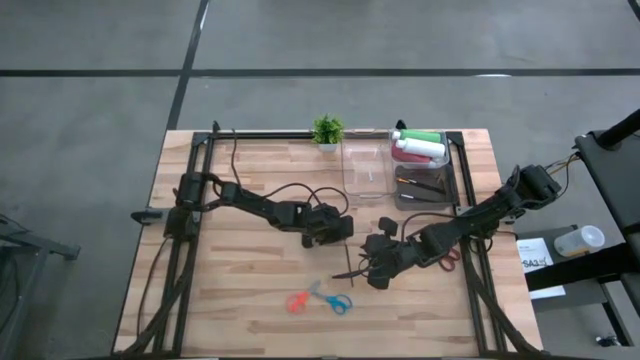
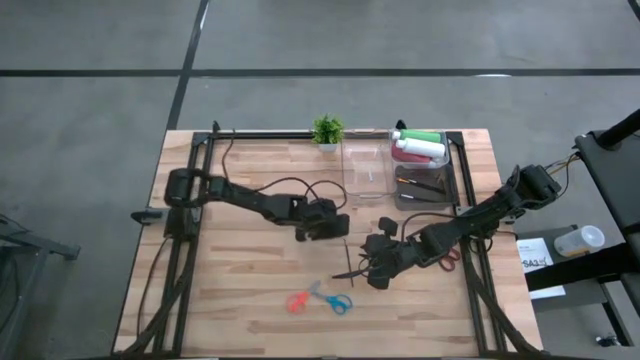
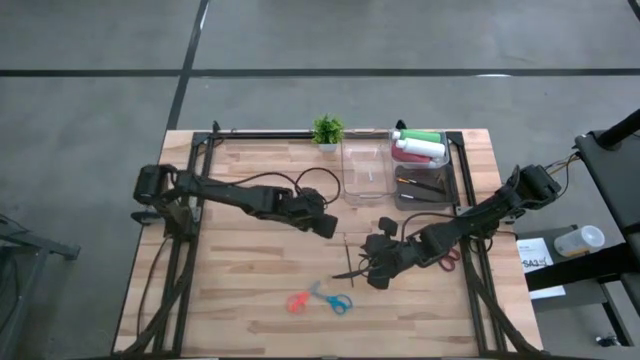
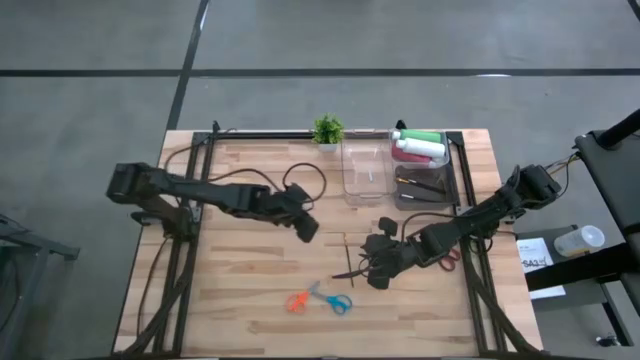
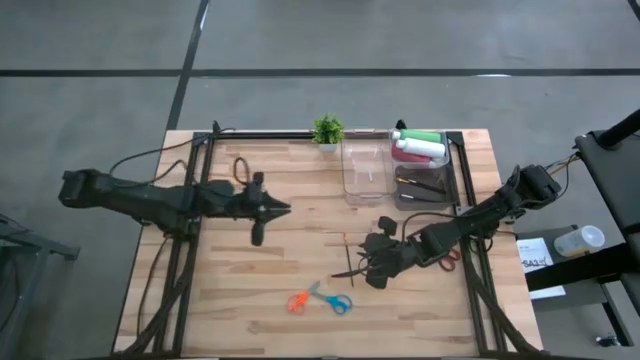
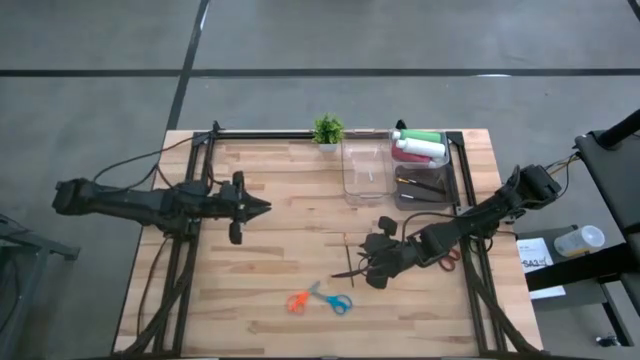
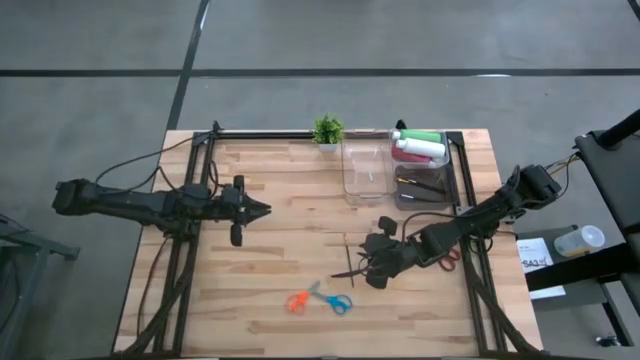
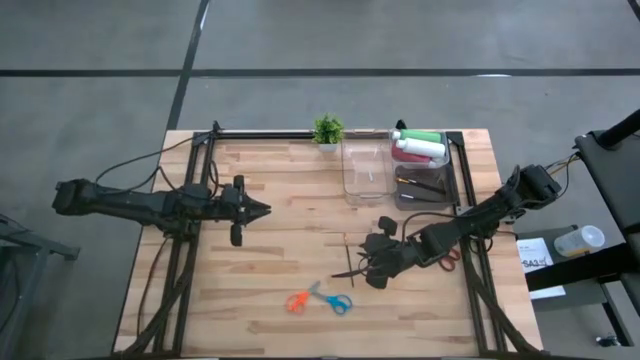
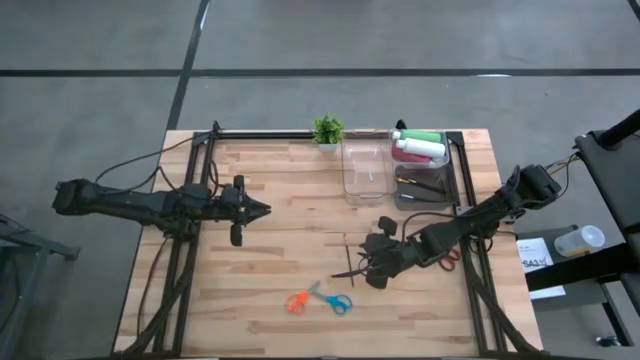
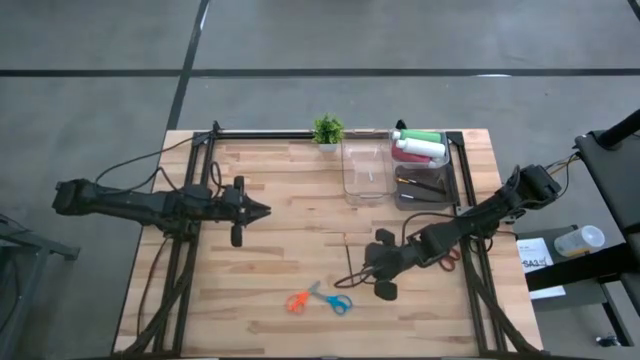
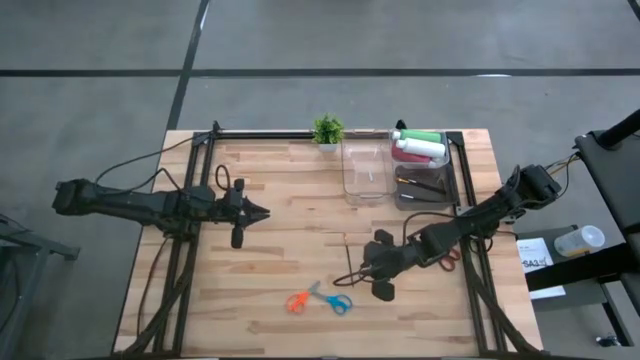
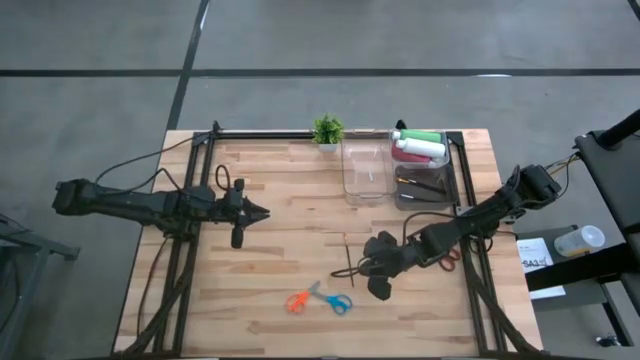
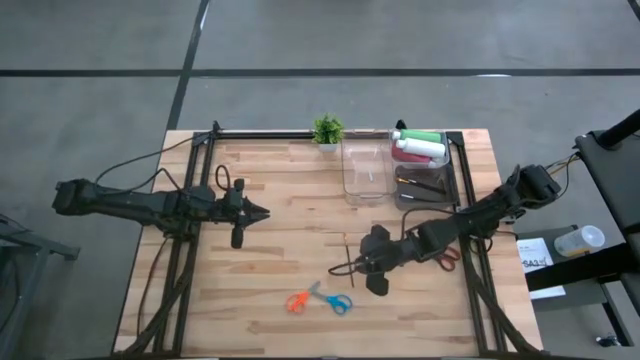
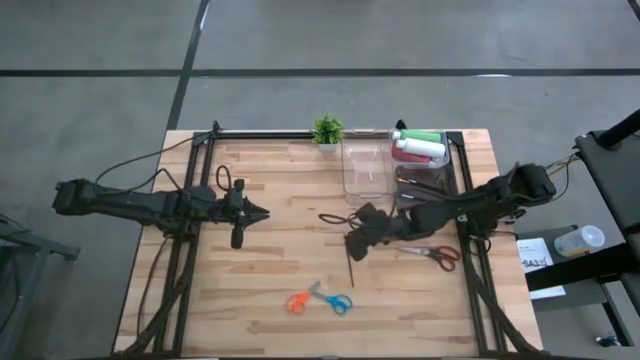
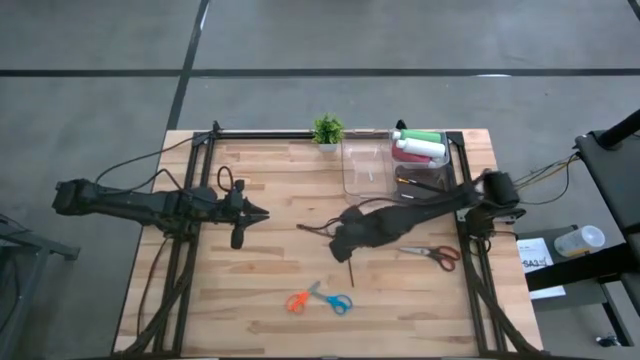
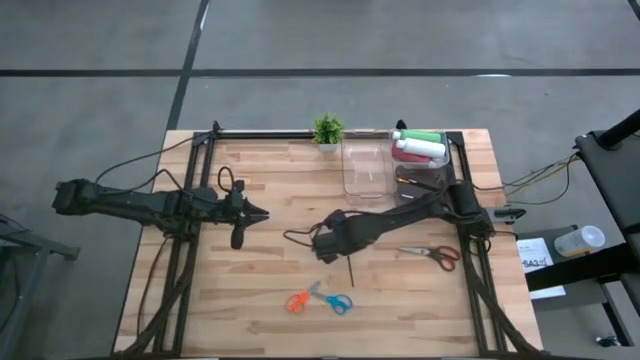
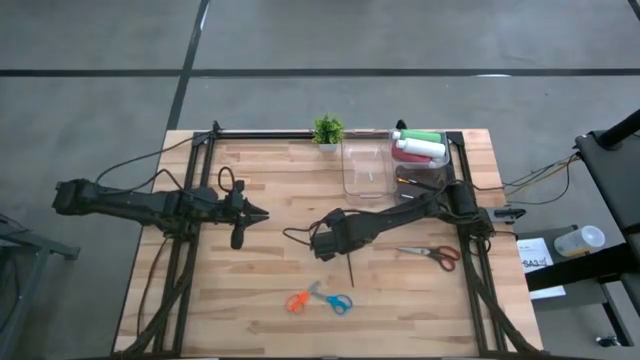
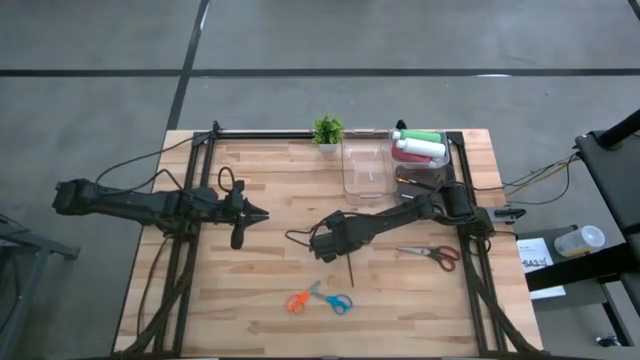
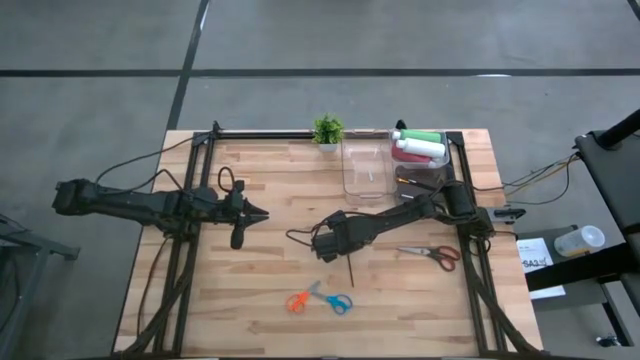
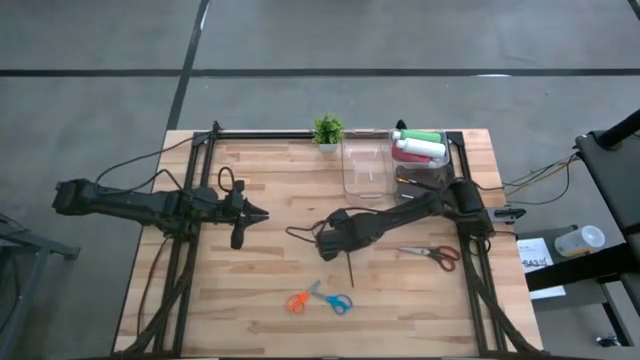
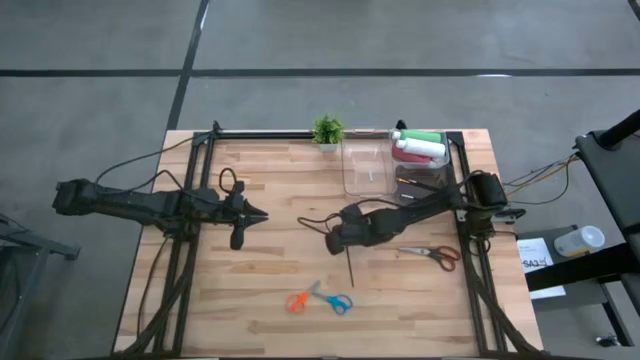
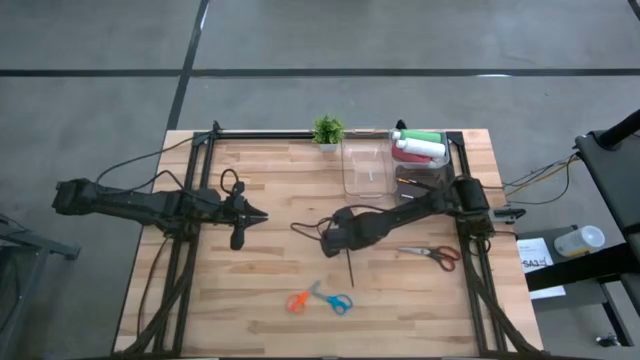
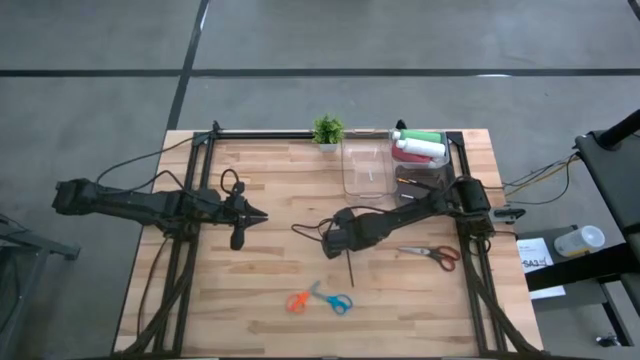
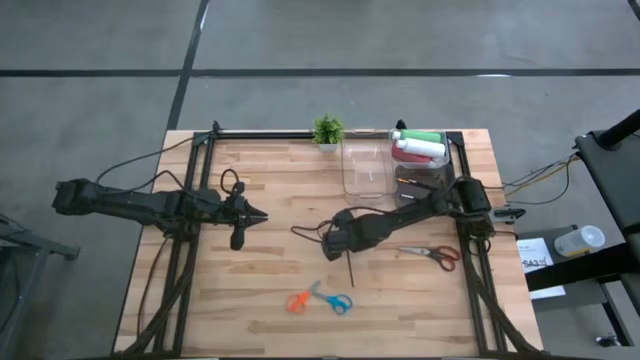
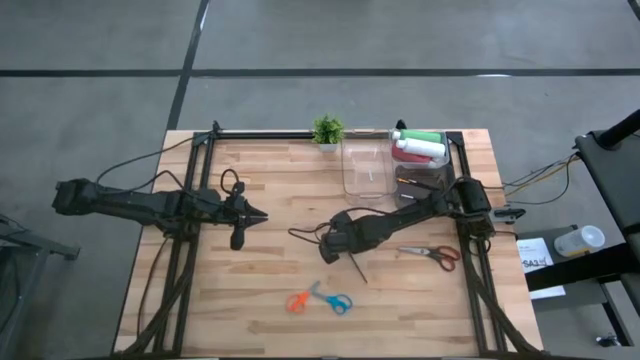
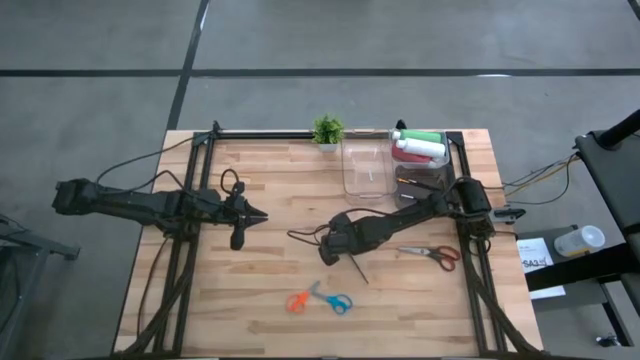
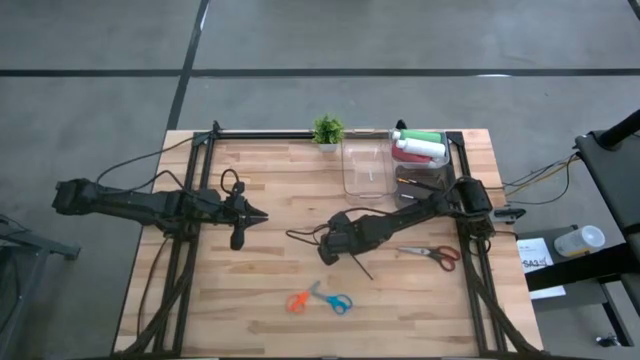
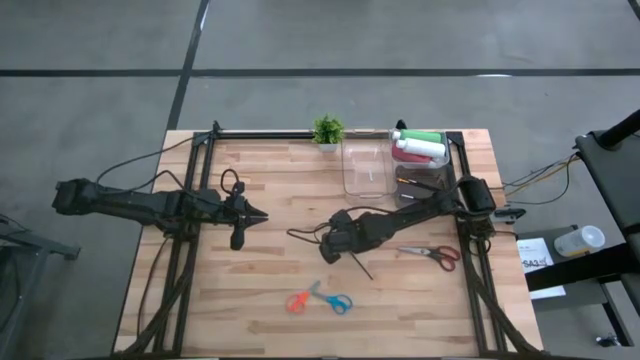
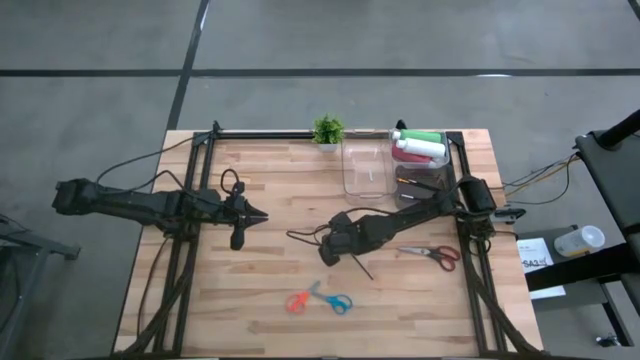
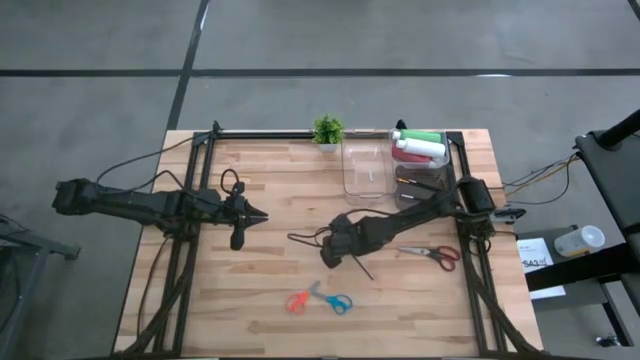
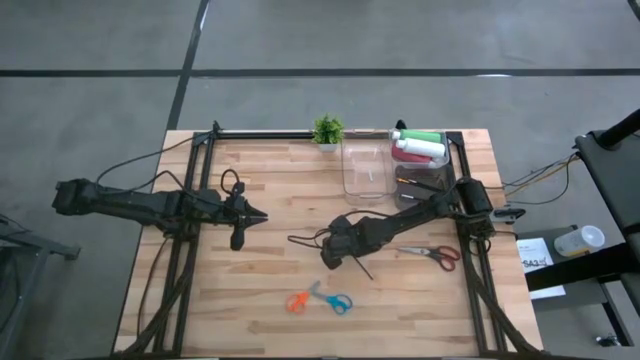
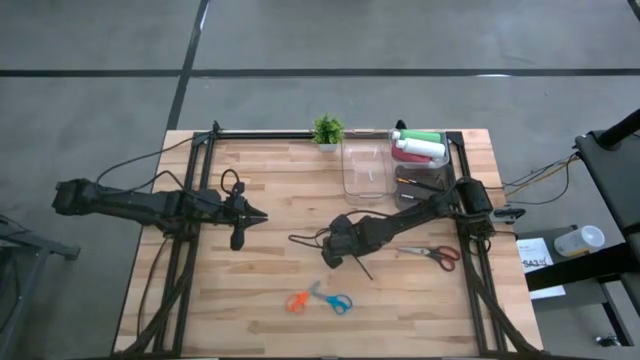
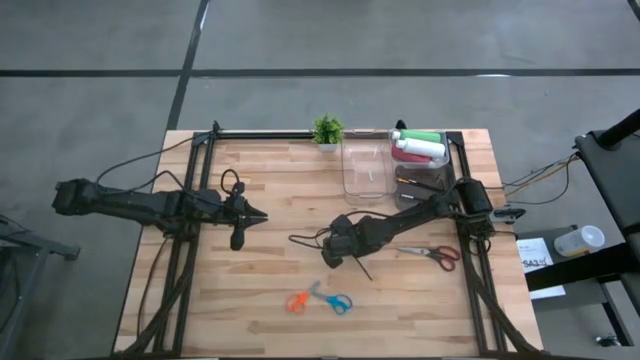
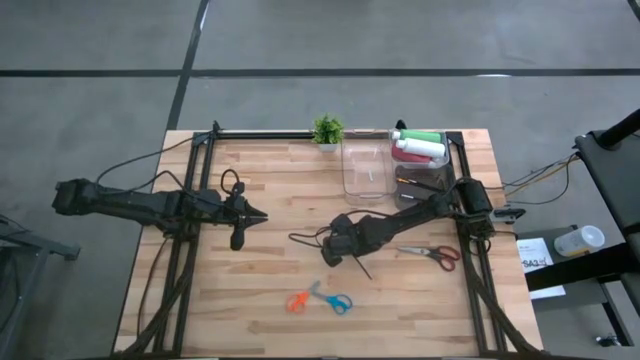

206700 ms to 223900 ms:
Task: Pick & Place Paint Supplies
Put the gold paintbrush into the black bin

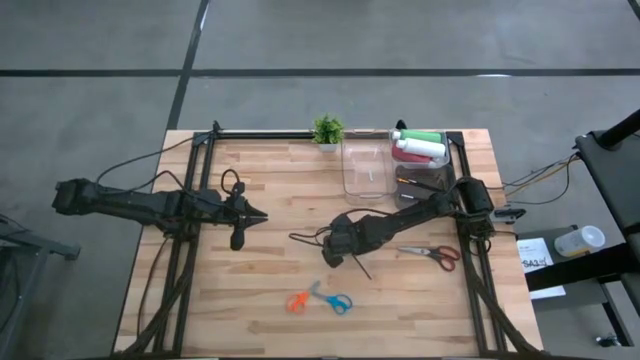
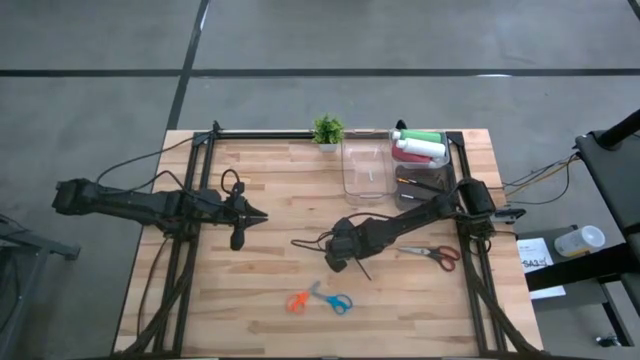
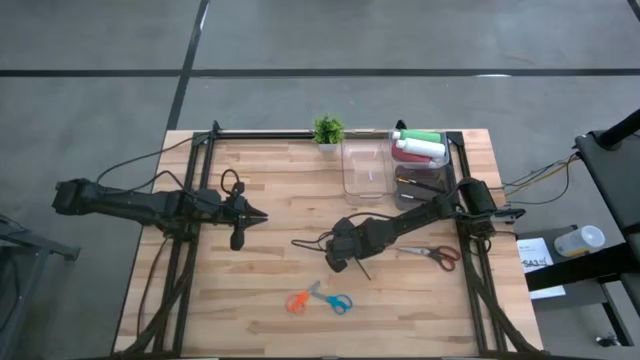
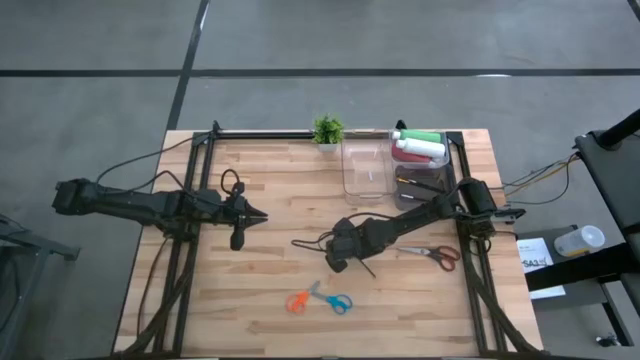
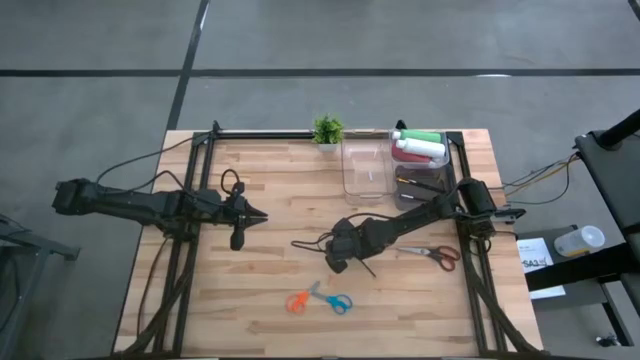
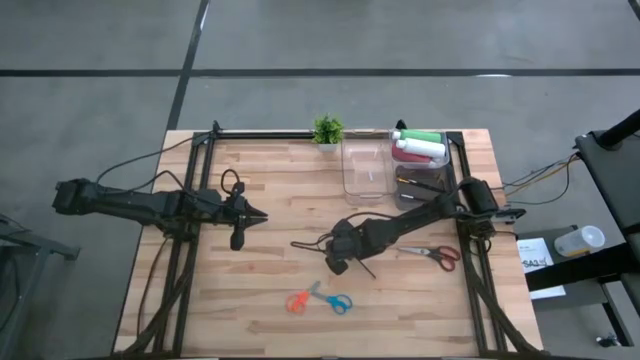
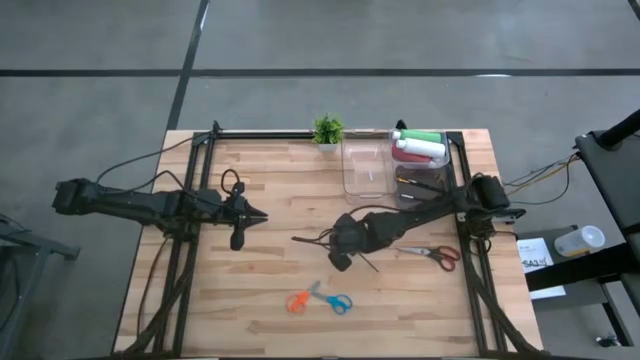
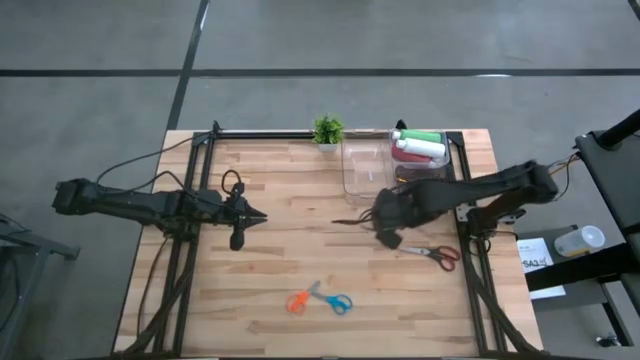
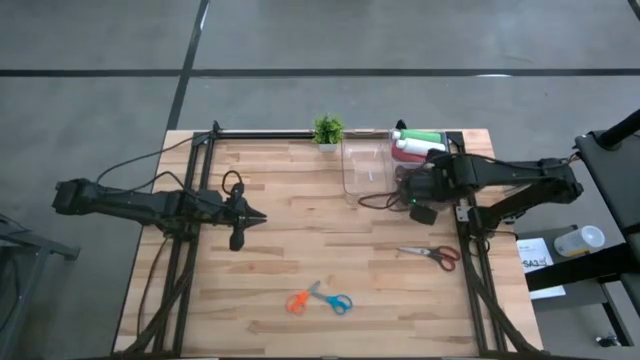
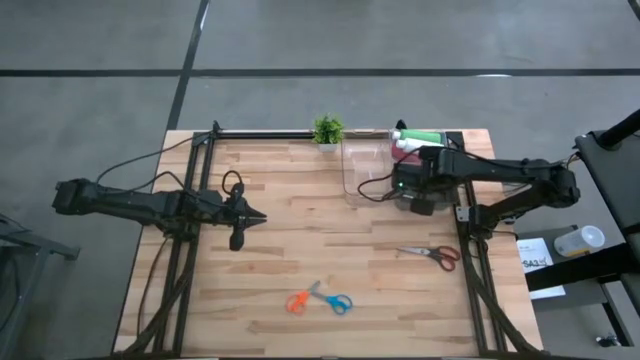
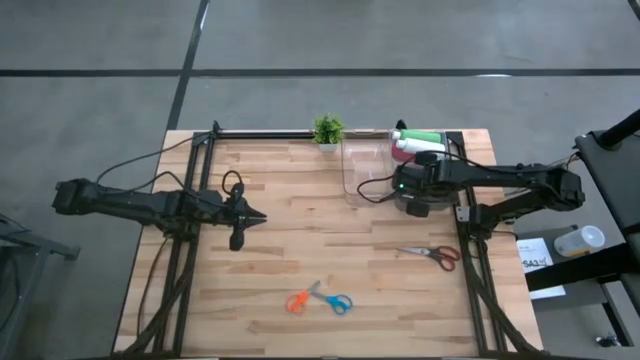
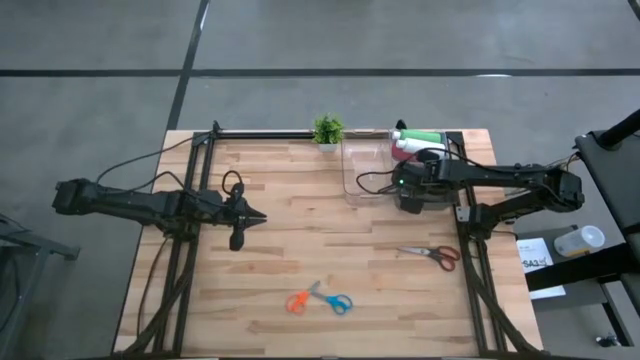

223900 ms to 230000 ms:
Put the gold paintbrush into the black bin
